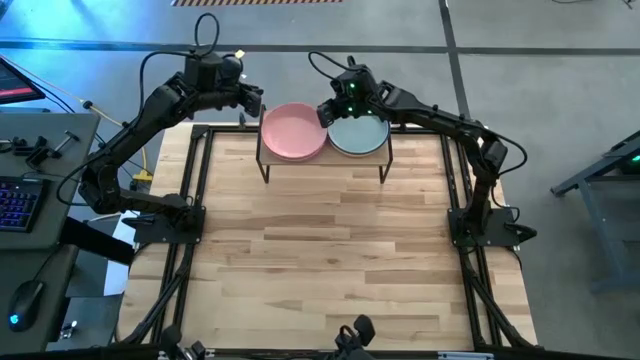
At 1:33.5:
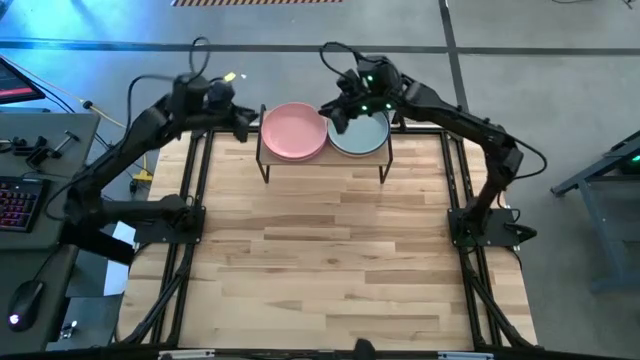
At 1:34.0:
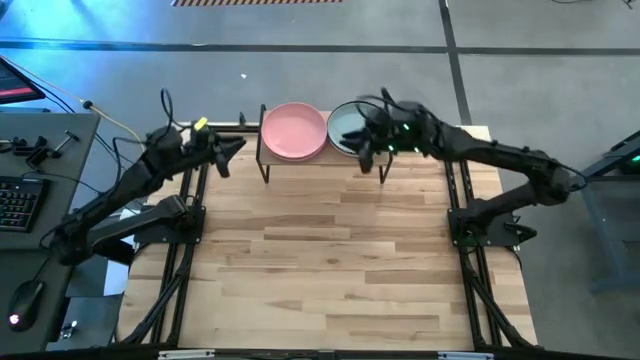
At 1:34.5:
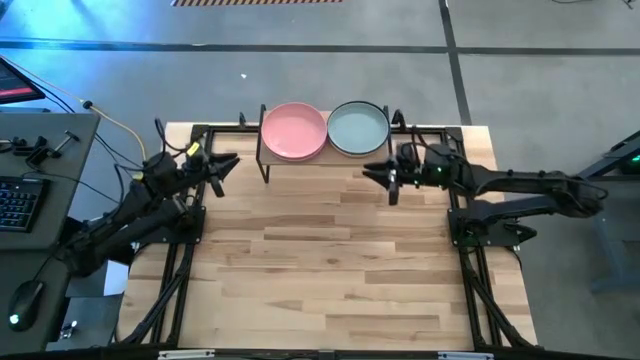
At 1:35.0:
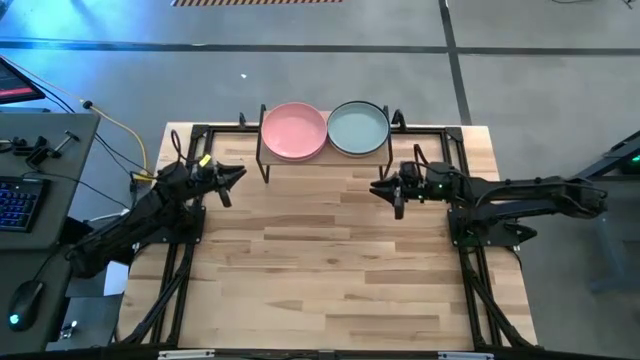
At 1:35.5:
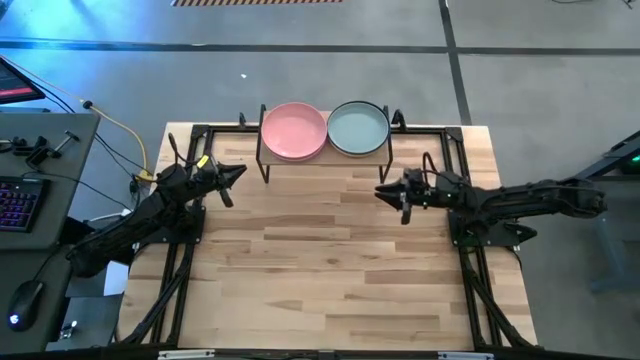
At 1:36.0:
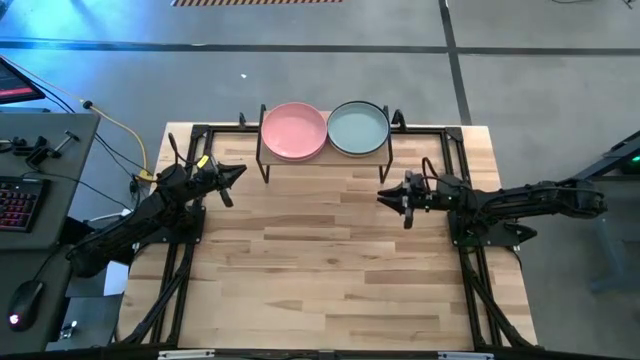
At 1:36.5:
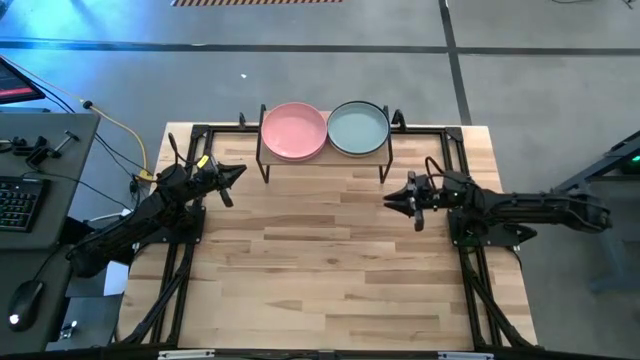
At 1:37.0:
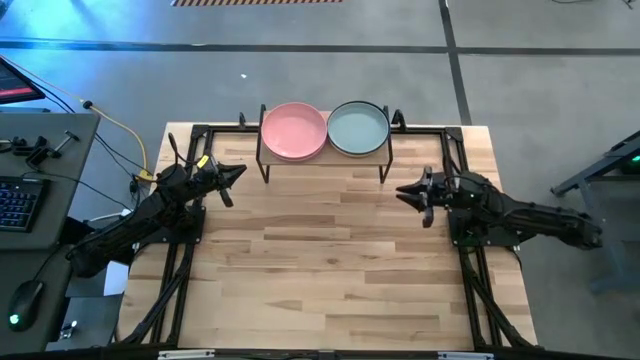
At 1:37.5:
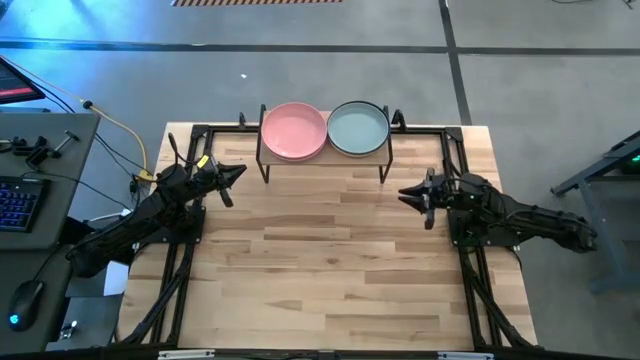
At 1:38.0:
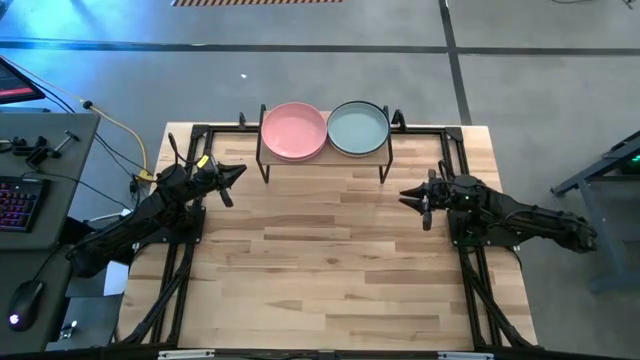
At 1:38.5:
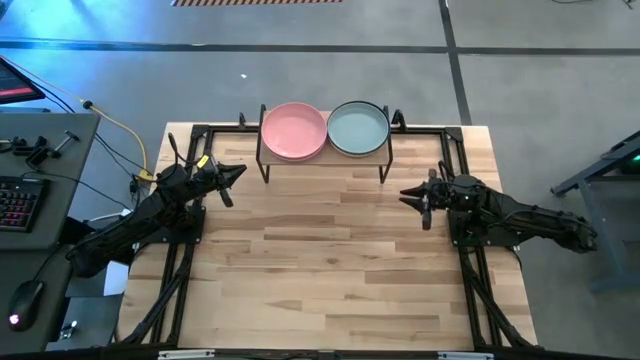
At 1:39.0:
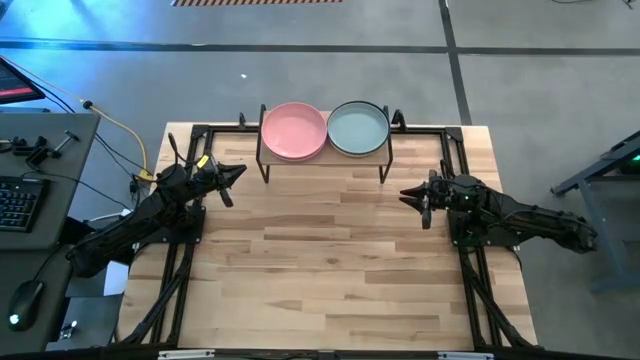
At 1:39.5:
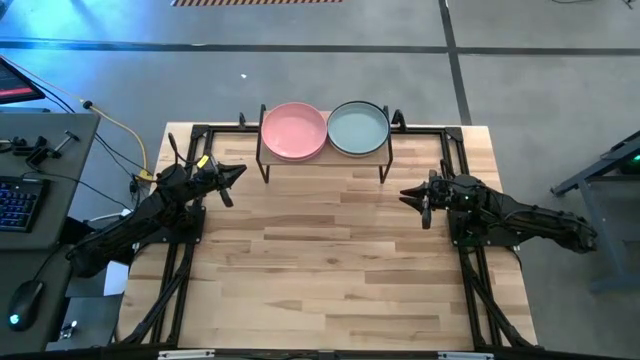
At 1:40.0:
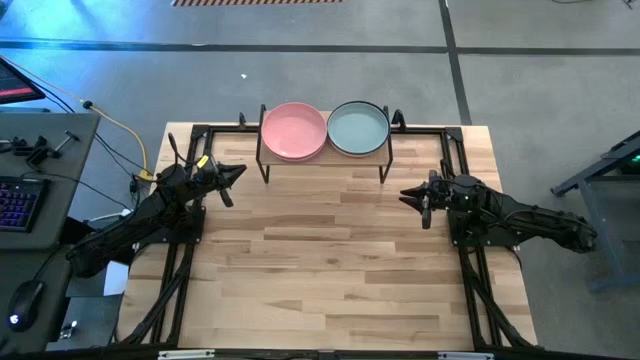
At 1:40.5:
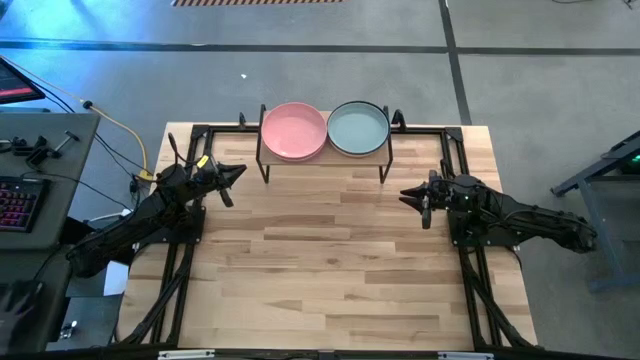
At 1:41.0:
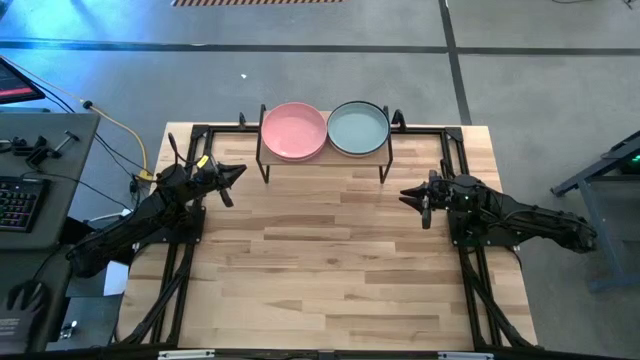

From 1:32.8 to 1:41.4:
Task: Place and stack plates onto a shelf
Return to Home Position

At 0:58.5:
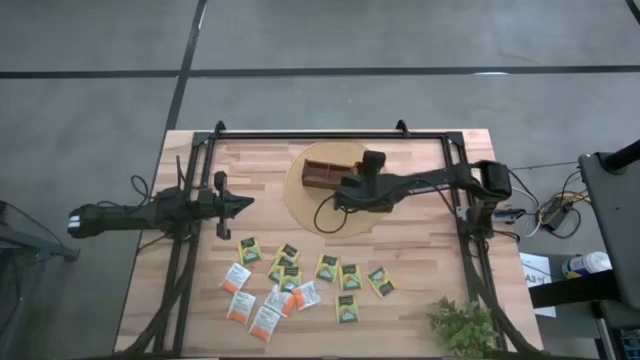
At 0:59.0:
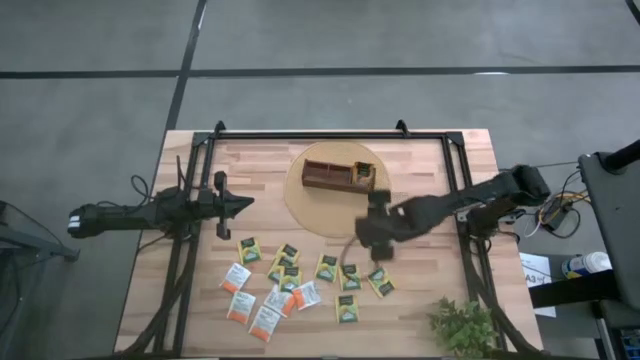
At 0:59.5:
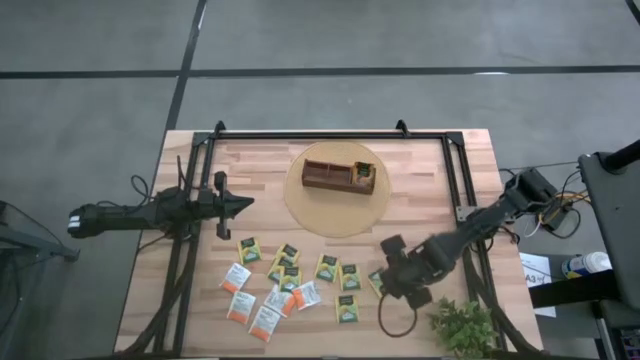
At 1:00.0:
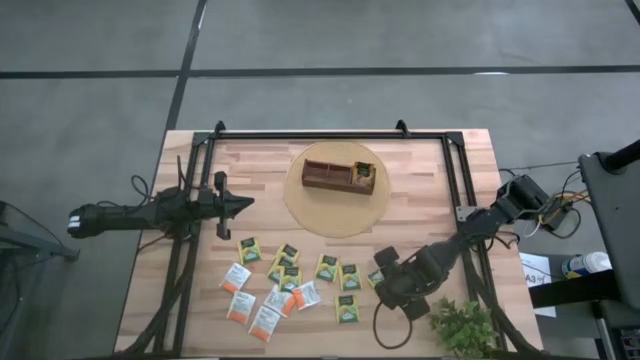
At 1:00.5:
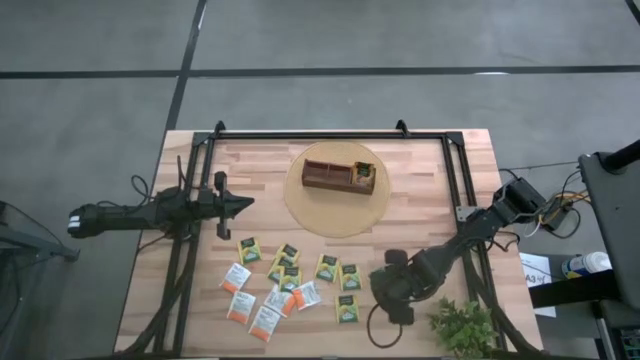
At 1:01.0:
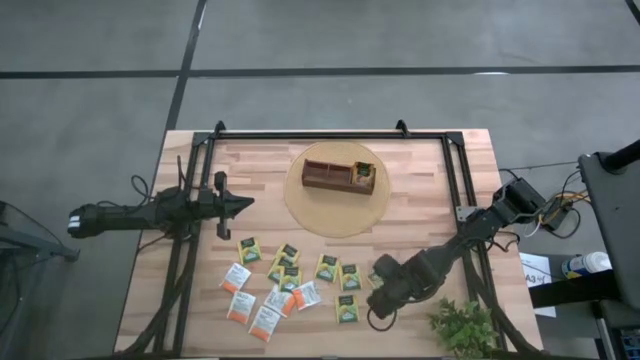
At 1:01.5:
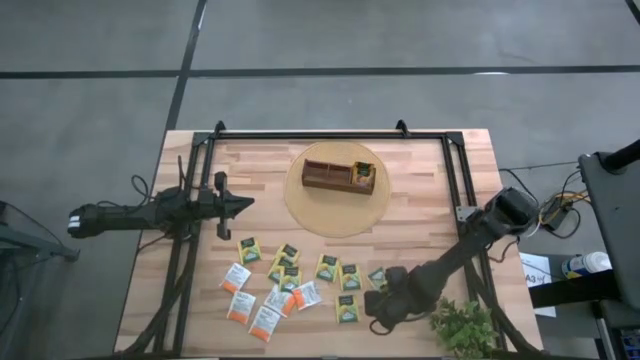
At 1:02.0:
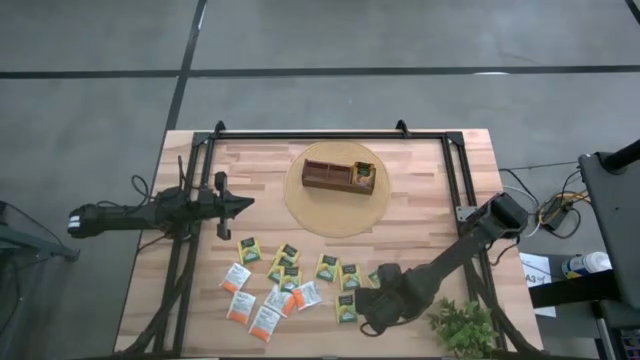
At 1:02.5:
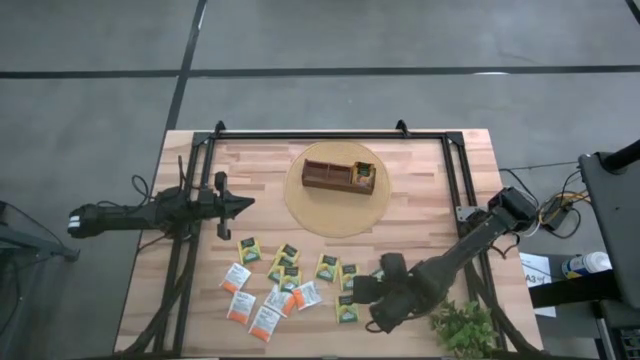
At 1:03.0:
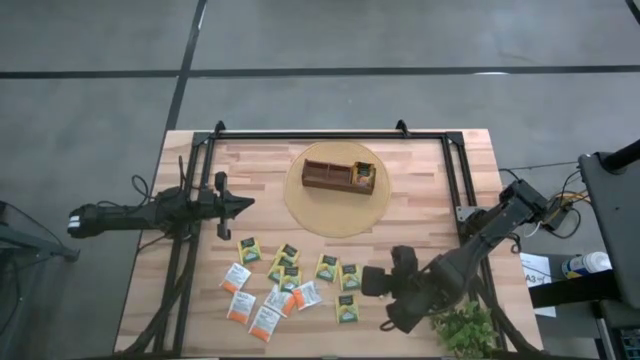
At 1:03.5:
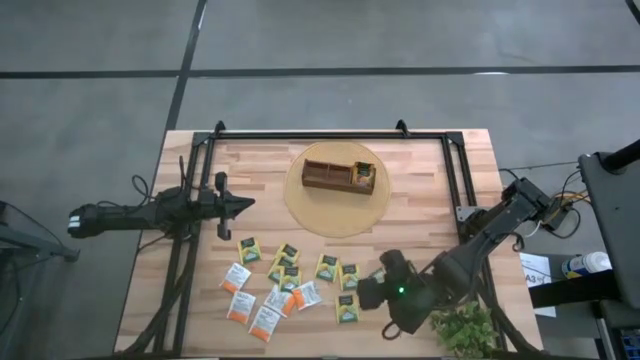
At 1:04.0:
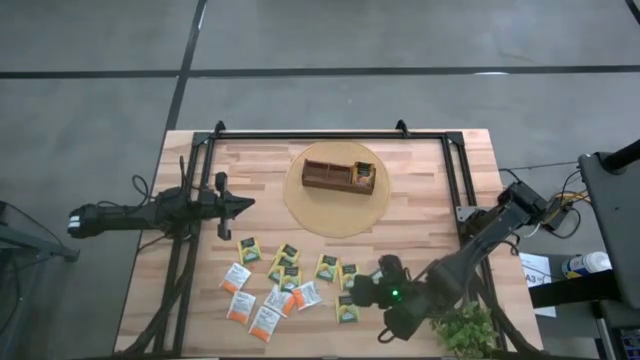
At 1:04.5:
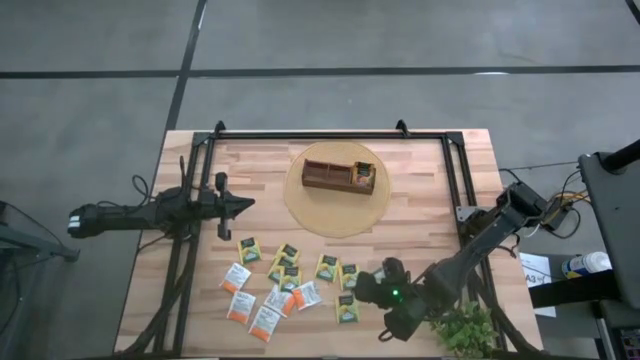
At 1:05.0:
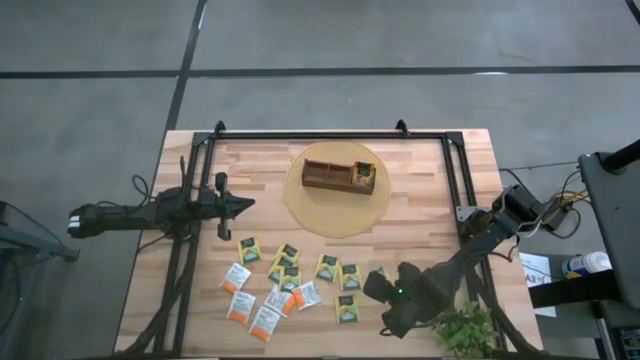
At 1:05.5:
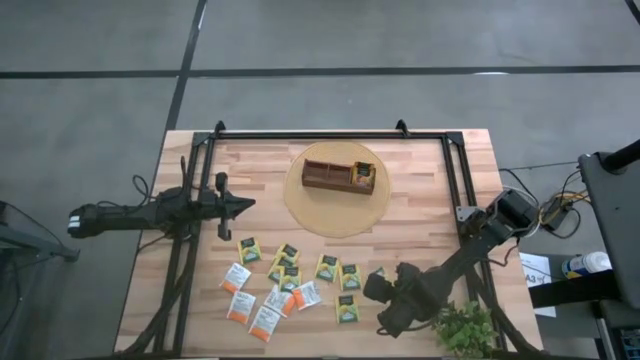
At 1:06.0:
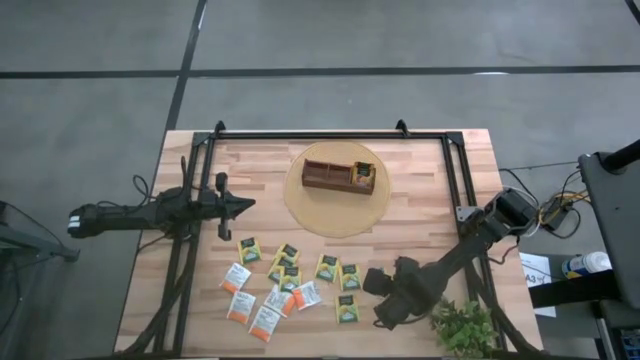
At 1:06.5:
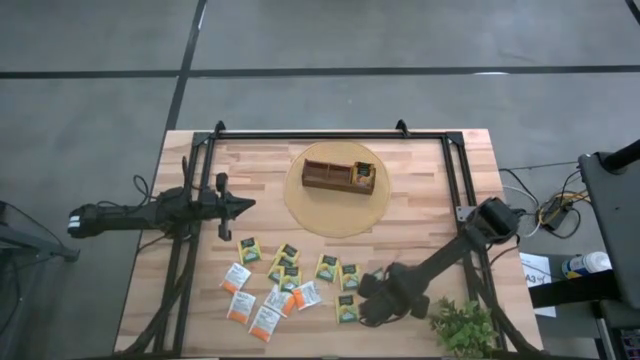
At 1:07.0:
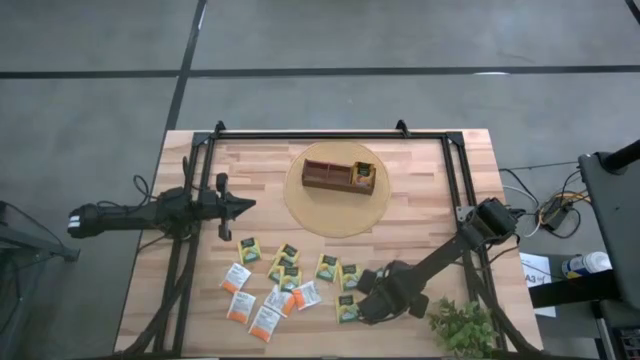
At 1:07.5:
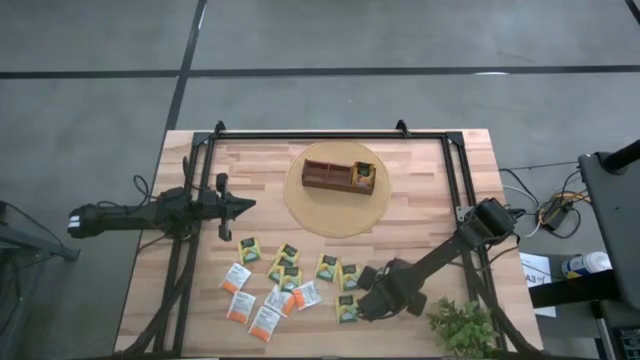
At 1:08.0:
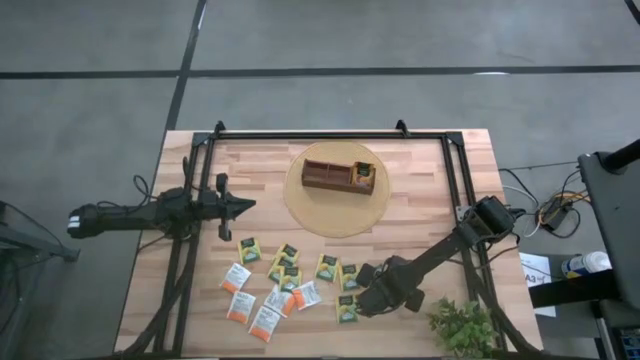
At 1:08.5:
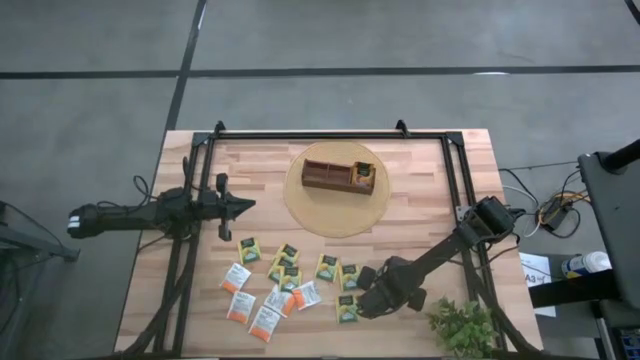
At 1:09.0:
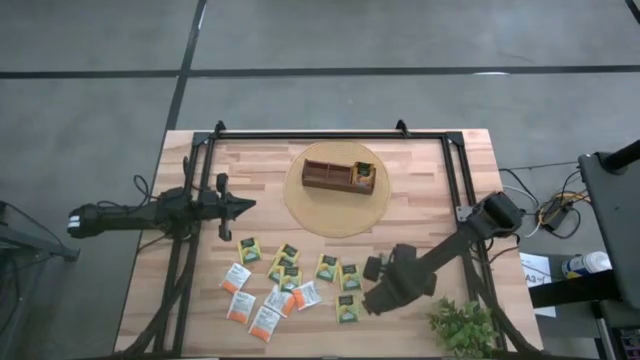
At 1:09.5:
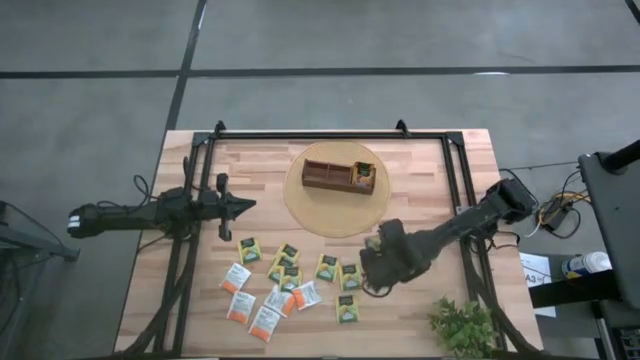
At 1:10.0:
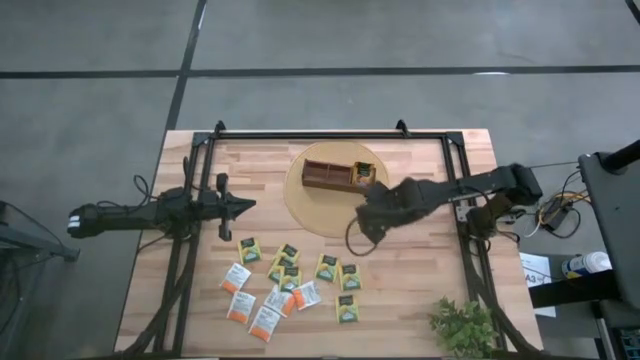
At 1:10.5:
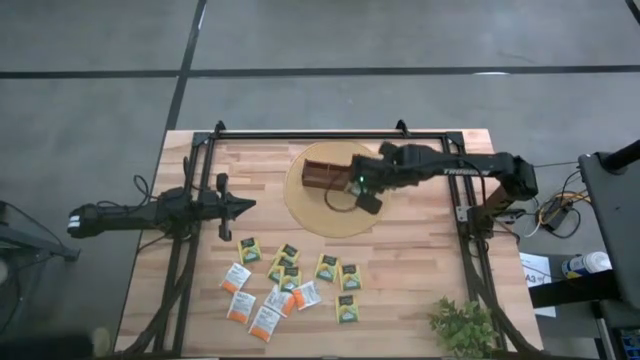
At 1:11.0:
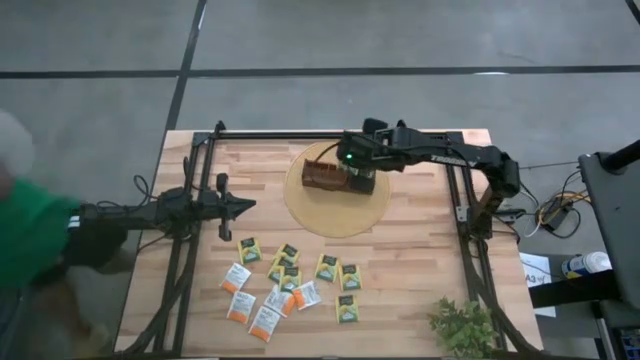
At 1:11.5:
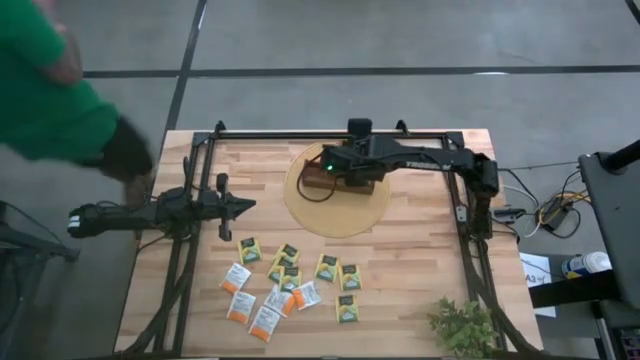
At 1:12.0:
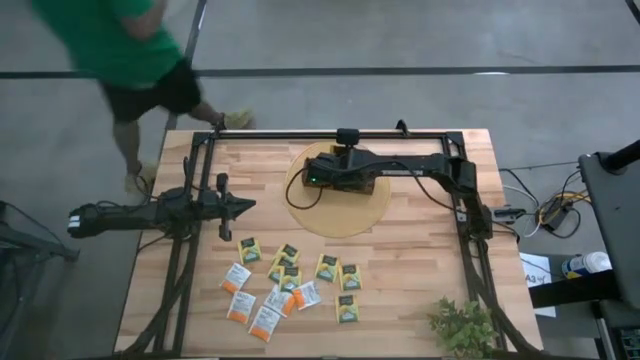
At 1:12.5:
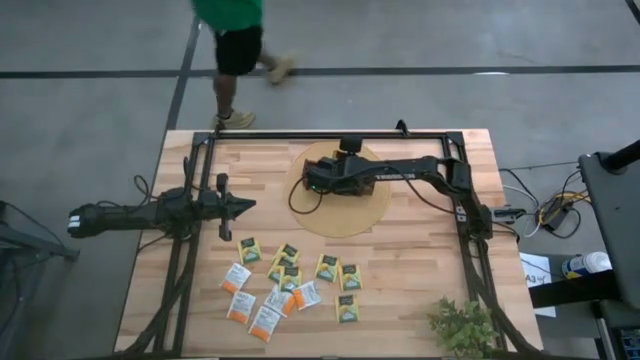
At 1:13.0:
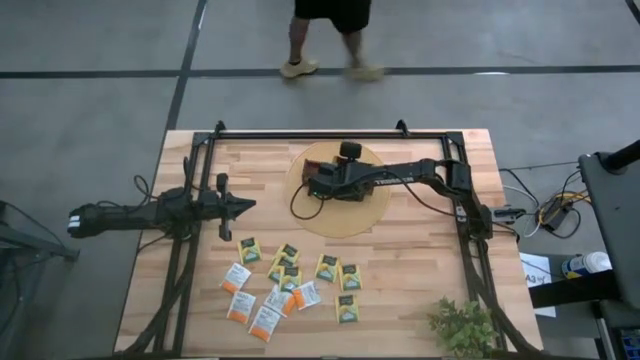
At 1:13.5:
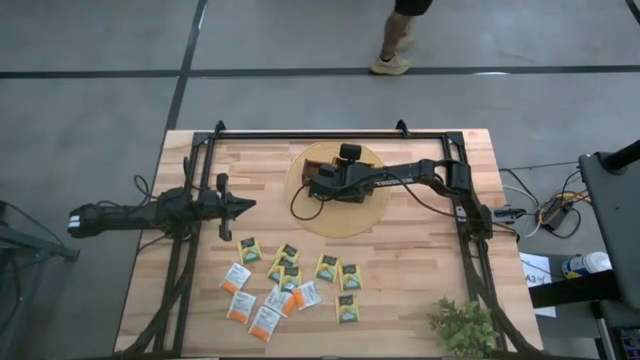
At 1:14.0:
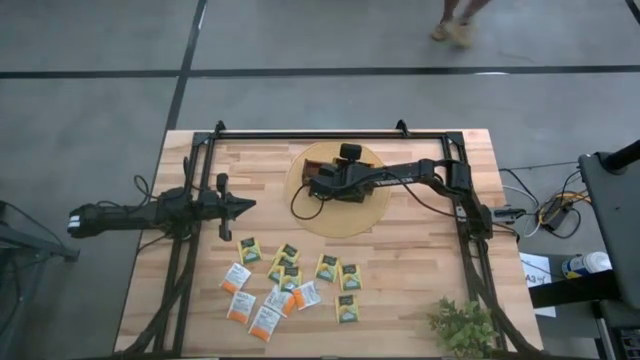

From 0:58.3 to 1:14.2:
Task: Pick & Place Tea
Put the green tea bag into the middle section of wooden organizer
